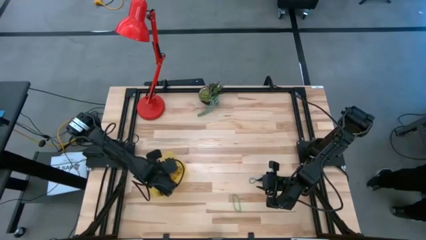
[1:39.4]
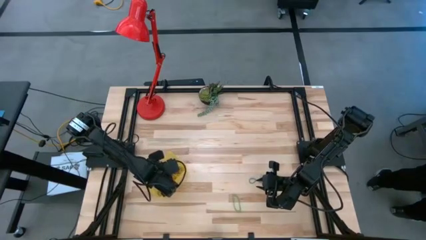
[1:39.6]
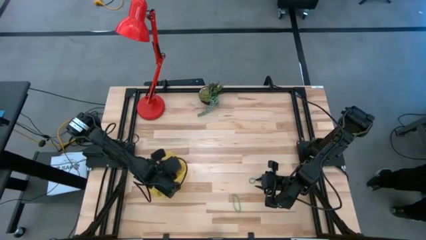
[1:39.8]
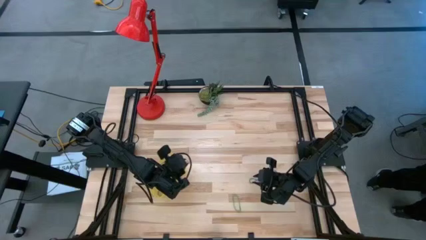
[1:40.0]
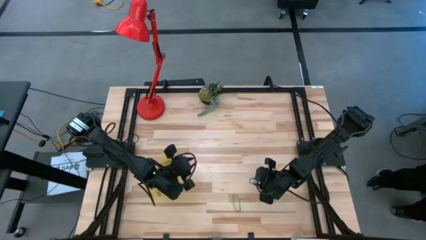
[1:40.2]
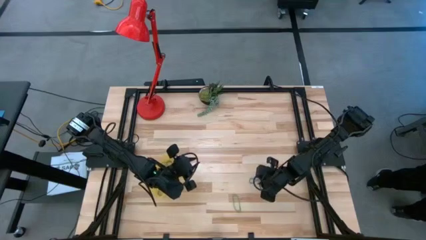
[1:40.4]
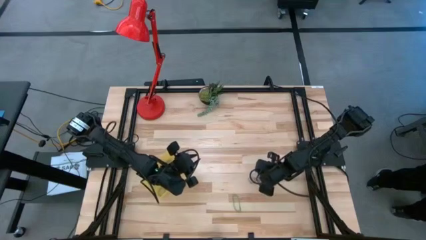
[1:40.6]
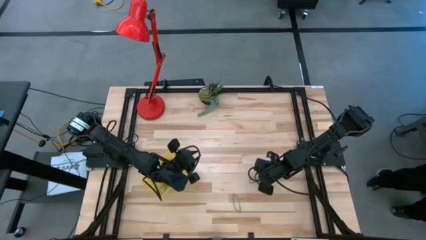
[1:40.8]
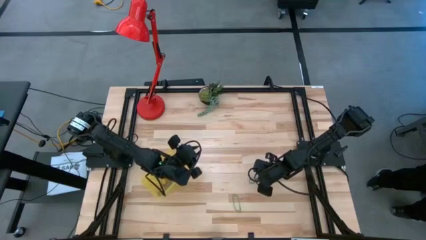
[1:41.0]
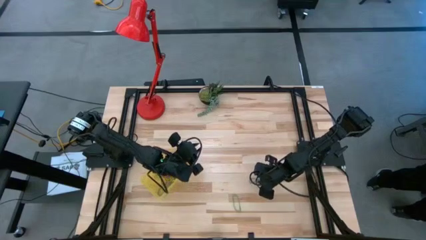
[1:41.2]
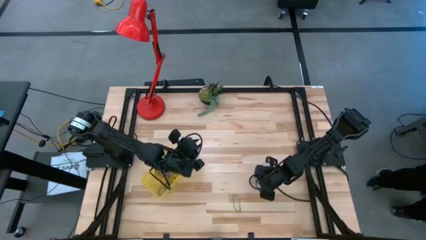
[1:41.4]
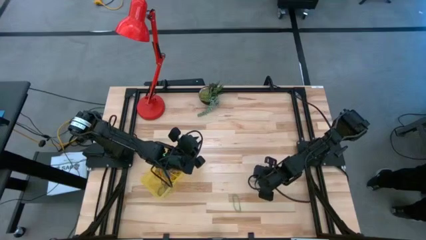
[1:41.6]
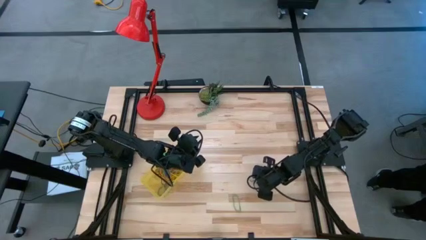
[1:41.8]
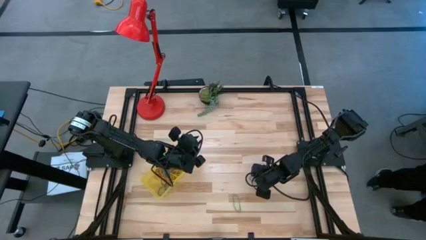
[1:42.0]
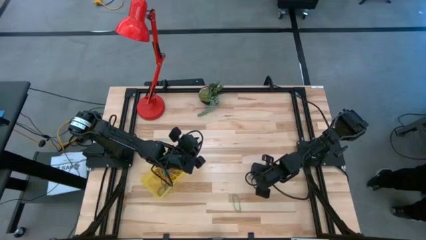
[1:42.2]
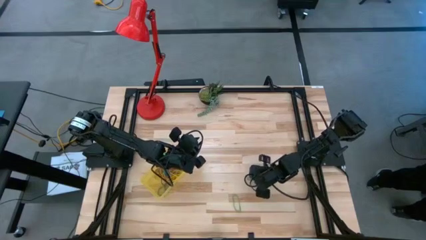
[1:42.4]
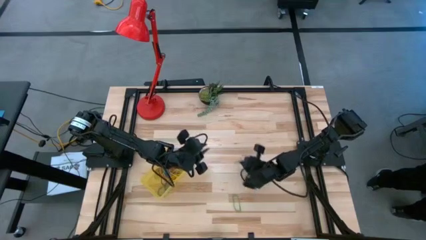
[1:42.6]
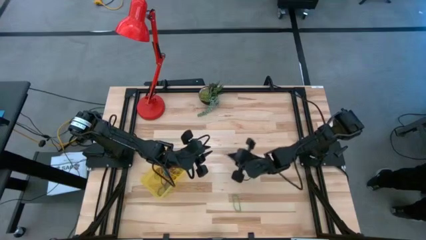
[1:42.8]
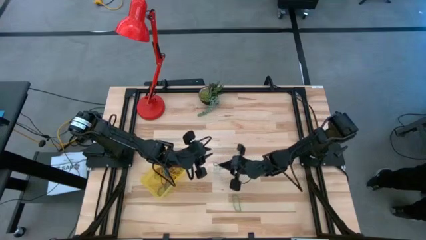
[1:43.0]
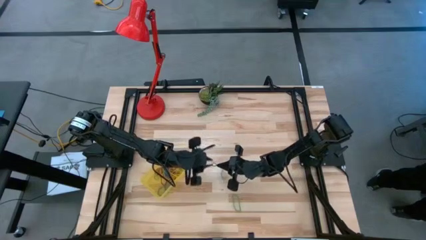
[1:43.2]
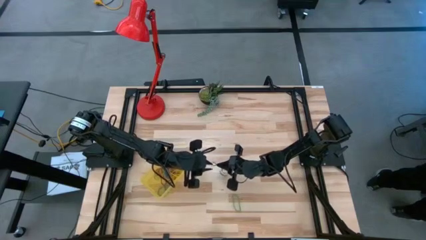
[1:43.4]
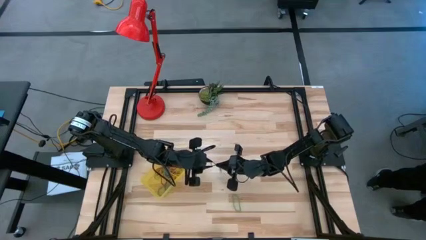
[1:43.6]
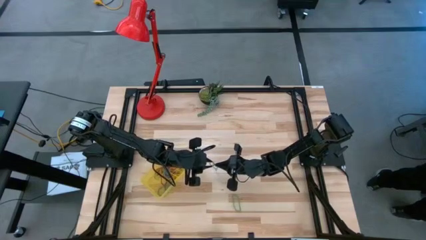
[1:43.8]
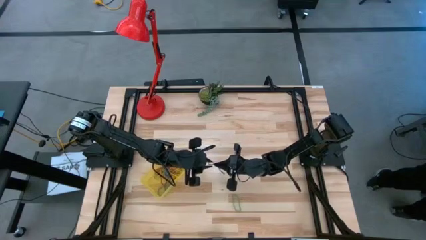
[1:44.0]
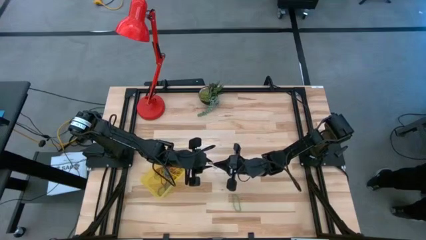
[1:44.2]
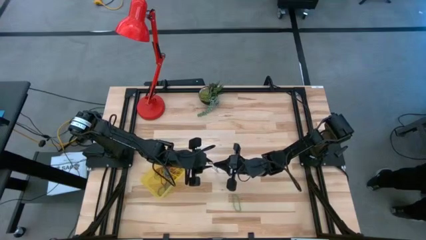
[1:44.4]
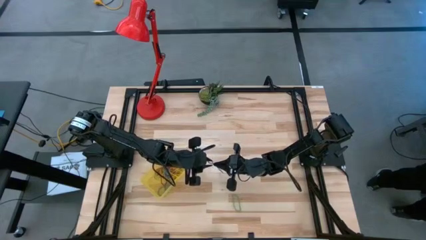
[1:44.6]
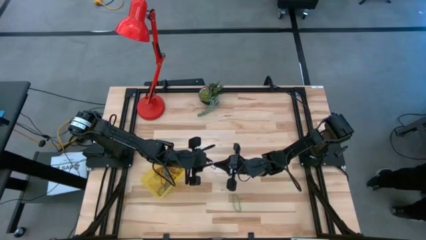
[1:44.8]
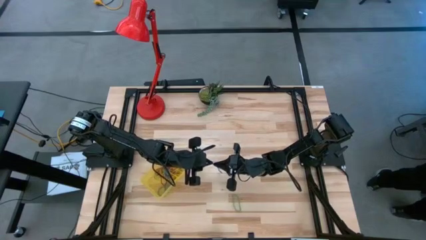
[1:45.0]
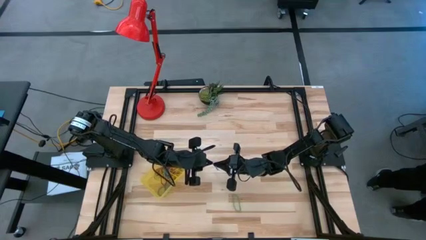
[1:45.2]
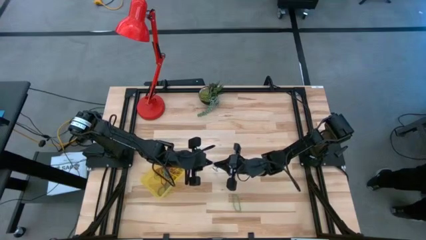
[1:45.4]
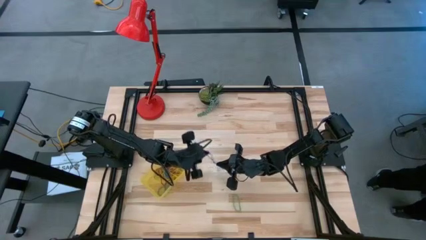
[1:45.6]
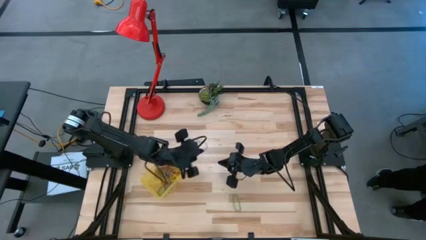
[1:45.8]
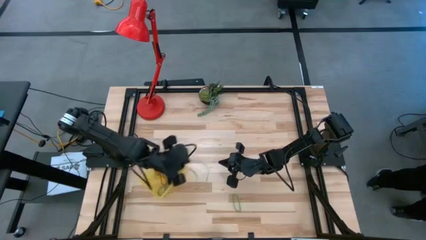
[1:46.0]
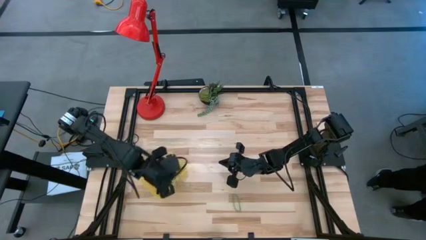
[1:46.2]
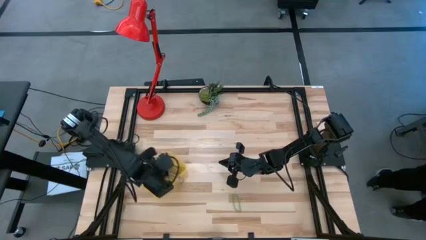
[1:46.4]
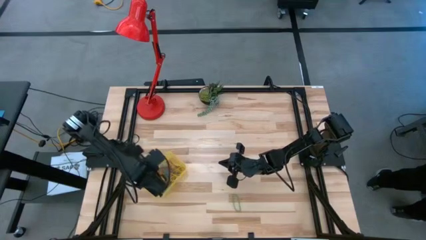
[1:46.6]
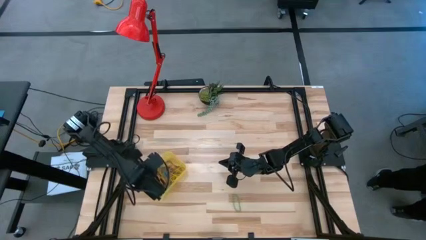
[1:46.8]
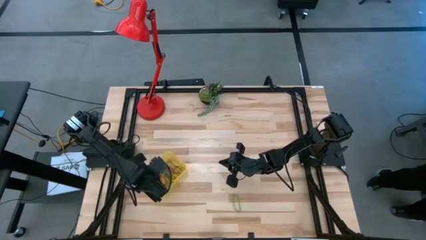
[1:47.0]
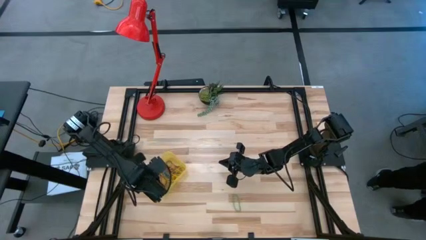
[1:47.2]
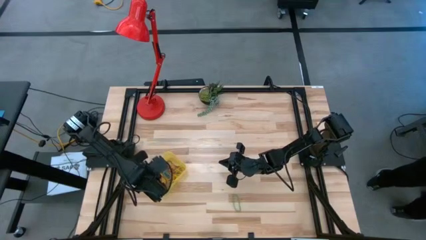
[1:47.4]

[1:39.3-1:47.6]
Task: Pick and place items into bin
Put the blue rubber band into the yellow bin

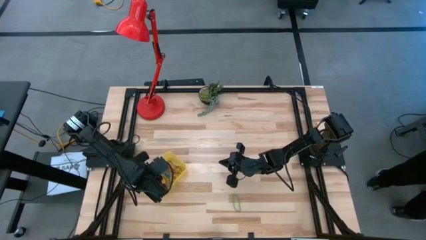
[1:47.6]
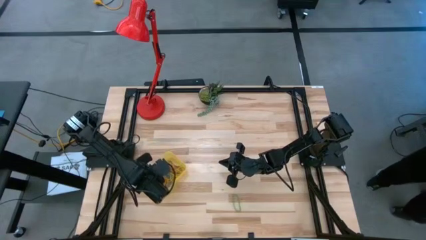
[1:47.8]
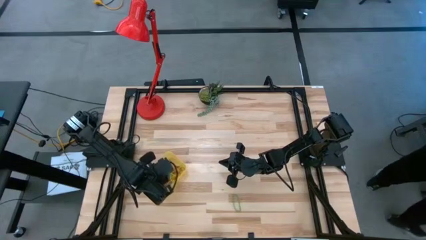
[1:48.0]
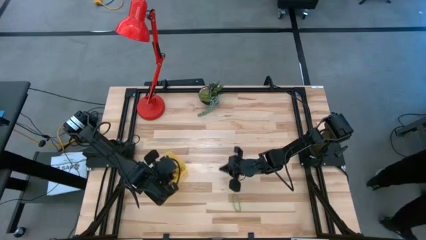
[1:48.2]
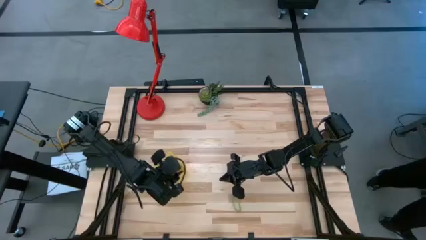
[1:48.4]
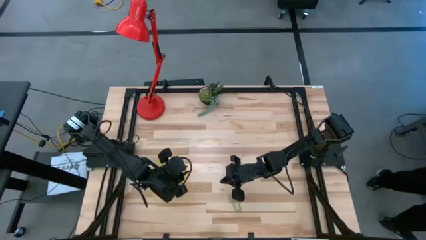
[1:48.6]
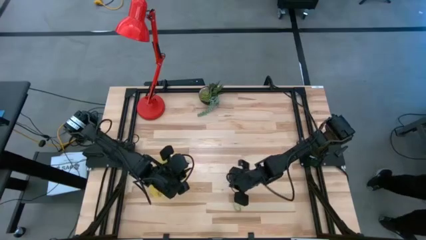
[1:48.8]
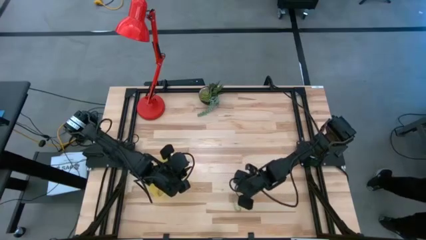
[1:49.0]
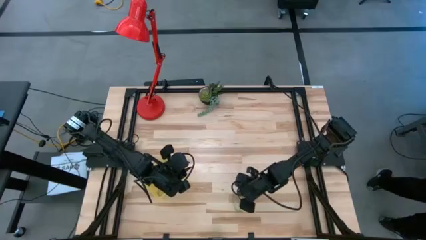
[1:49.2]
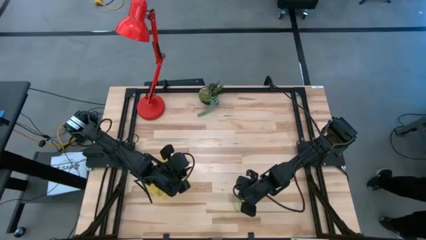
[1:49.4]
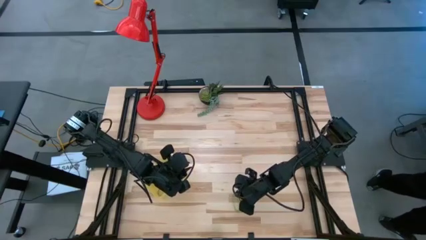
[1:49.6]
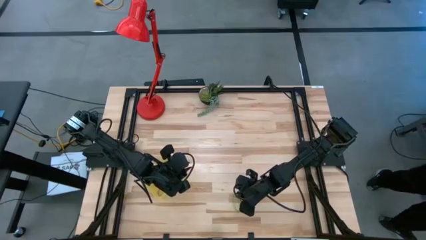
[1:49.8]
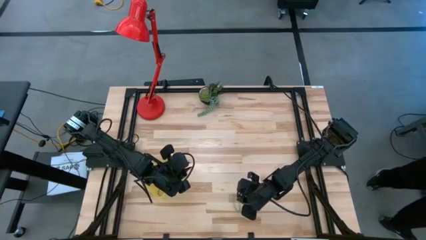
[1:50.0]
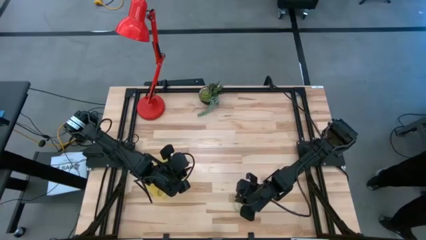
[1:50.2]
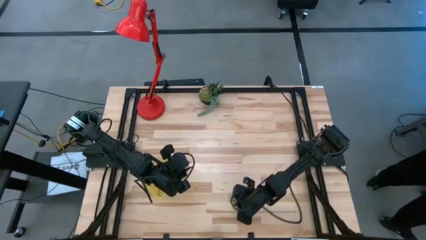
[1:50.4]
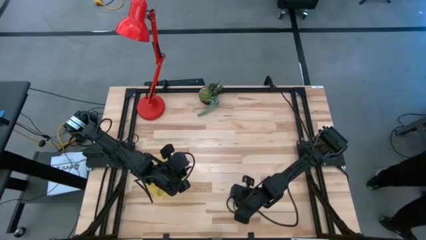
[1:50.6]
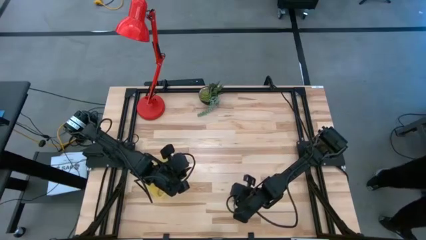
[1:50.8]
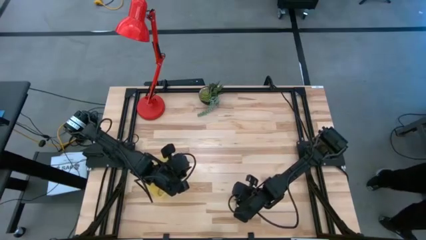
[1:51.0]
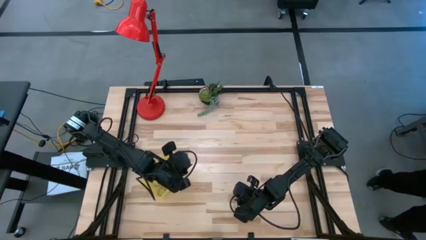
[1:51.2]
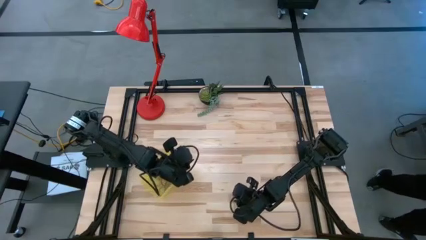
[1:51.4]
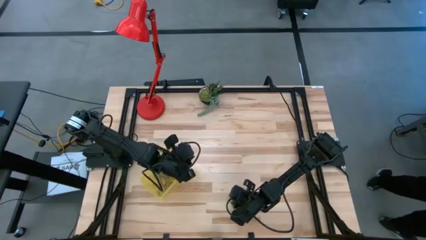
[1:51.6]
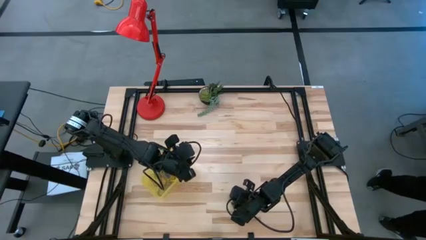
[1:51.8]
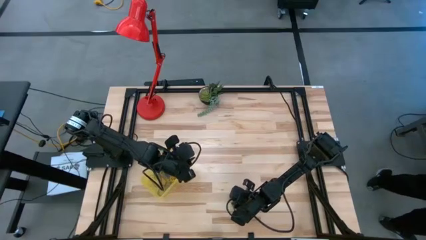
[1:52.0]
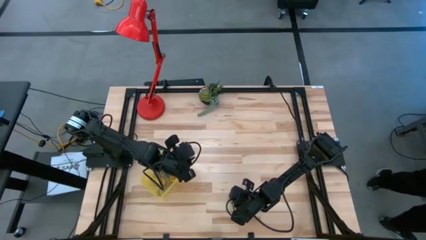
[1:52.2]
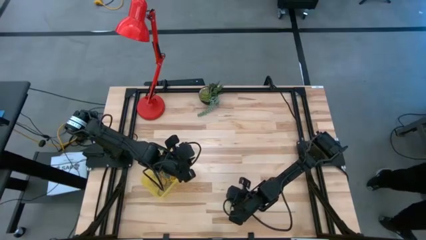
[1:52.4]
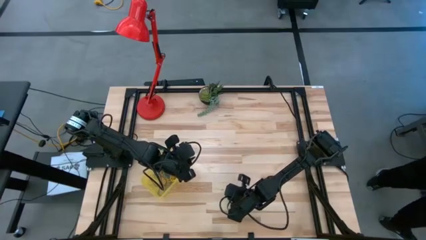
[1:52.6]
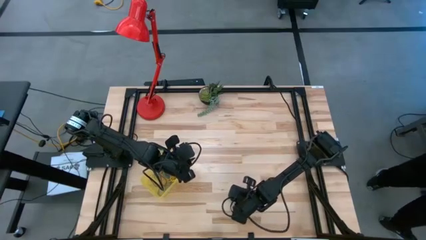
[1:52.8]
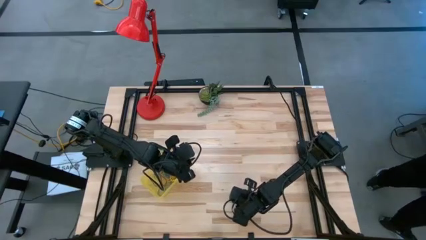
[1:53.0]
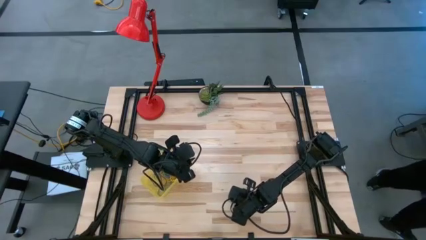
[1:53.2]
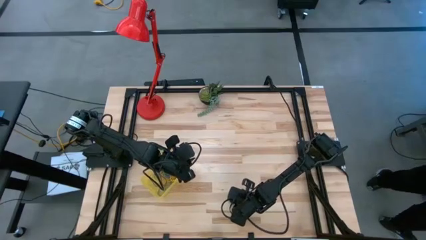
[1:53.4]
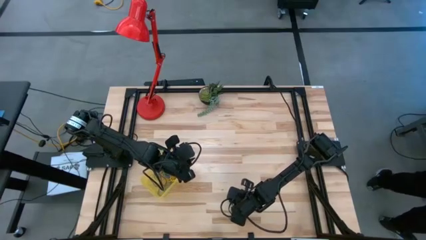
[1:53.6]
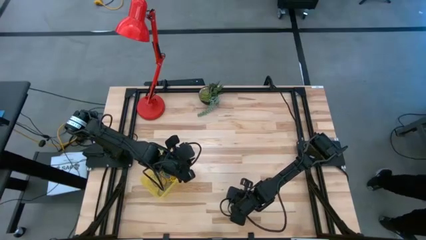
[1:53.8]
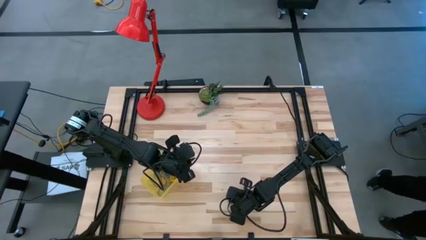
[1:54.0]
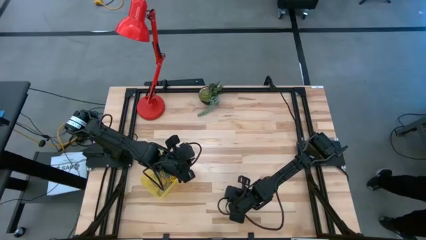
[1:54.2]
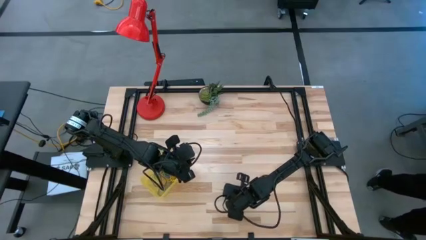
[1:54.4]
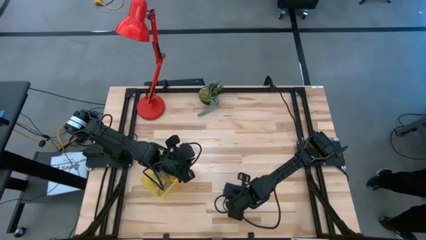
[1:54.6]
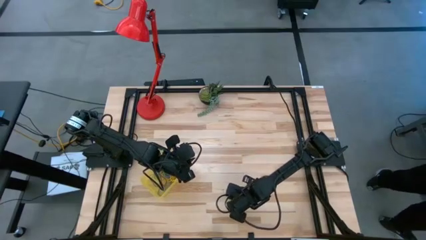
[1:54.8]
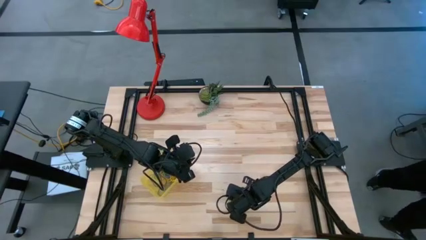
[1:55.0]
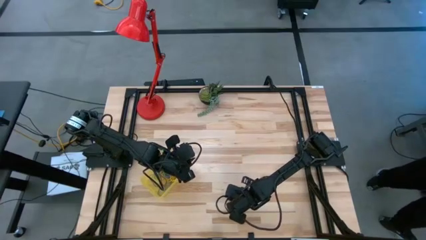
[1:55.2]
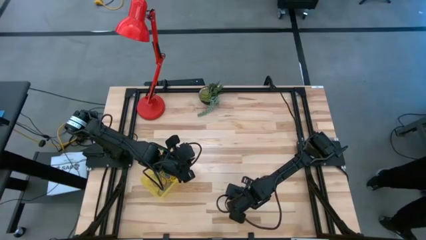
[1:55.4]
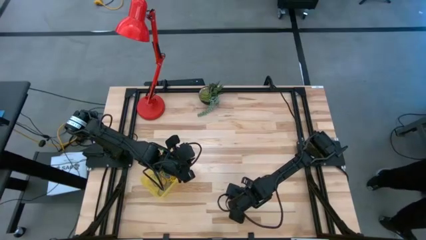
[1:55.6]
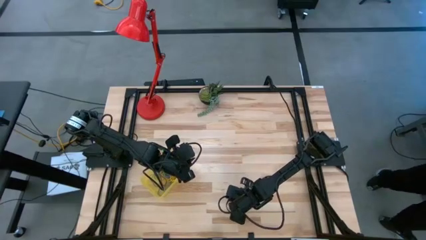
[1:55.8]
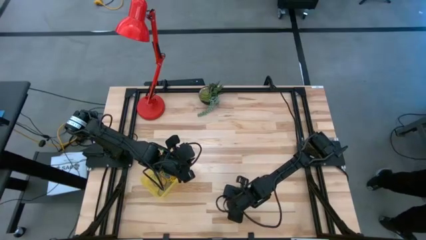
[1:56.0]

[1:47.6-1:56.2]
Put the green rubber band into the yellow bin
